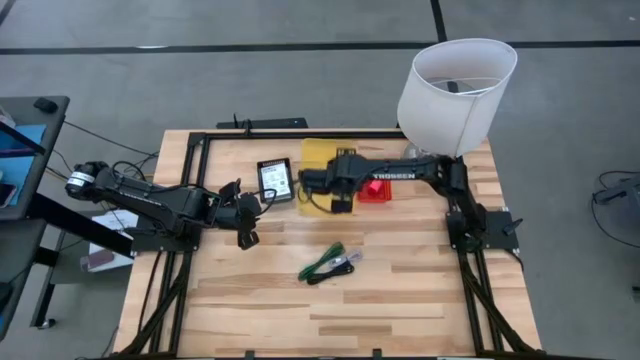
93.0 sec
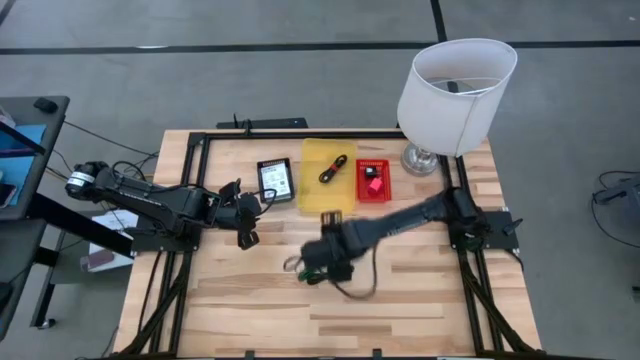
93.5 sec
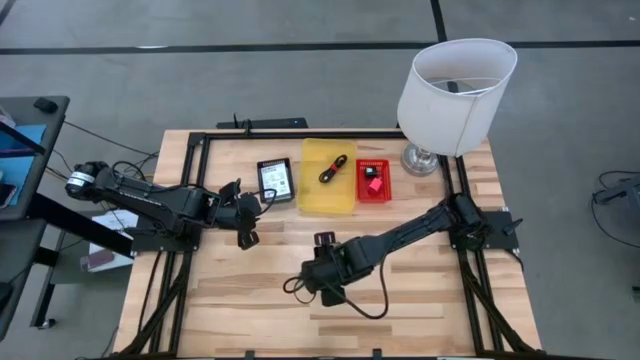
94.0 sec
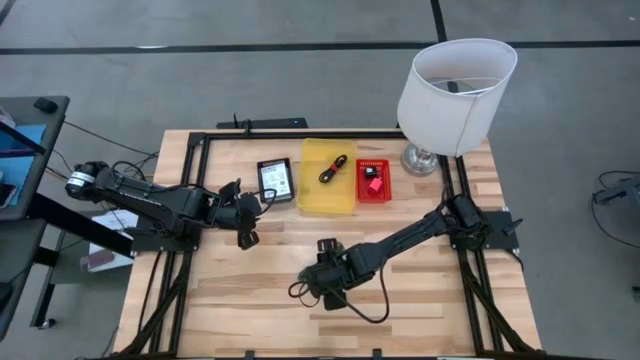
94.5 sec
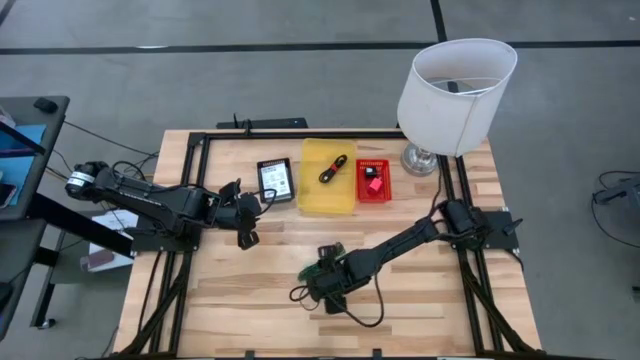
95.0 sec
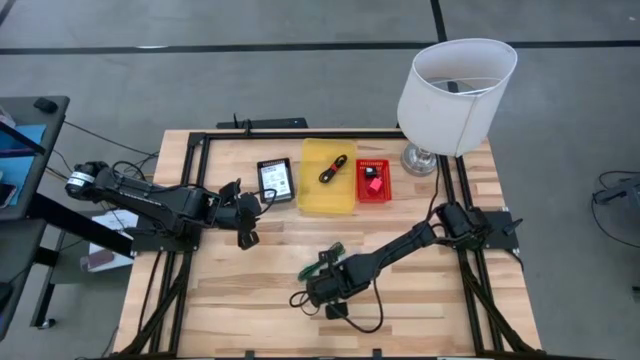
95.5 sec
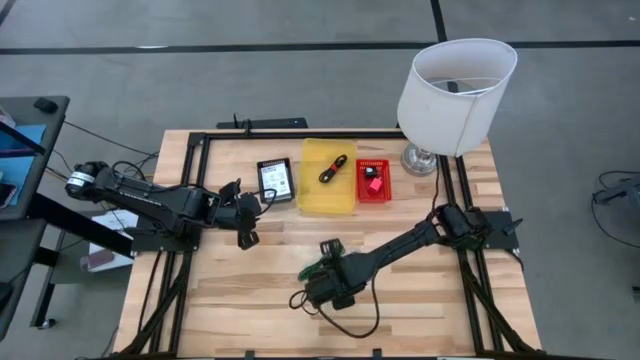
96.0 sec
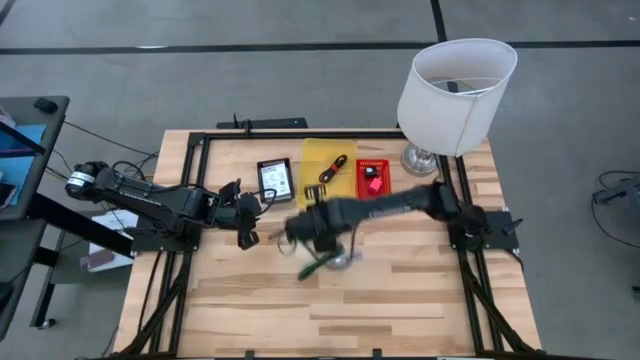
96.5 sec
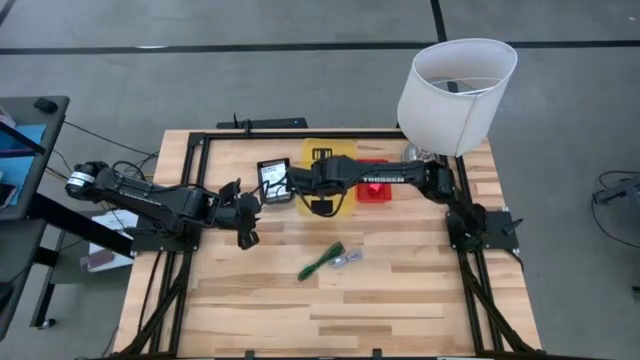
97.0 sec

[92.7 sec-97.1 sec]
Task: Pick and place items into bin
Put the black charger cable into the yellow bin

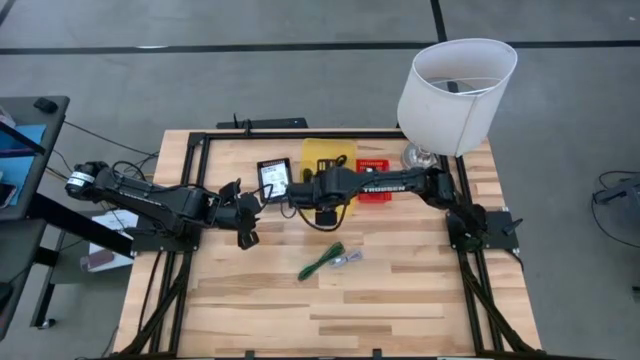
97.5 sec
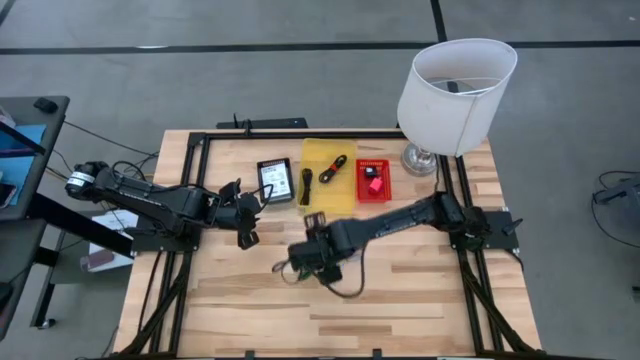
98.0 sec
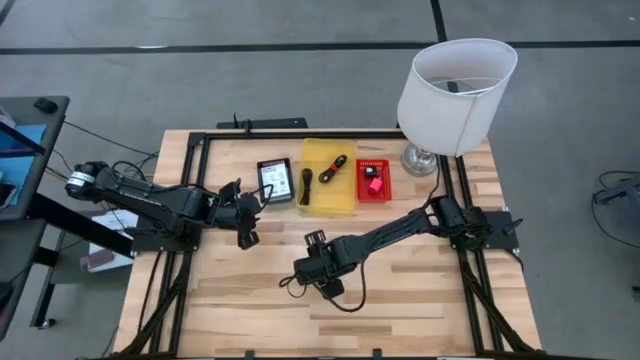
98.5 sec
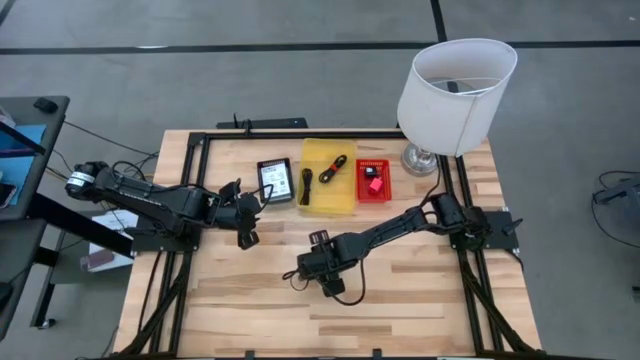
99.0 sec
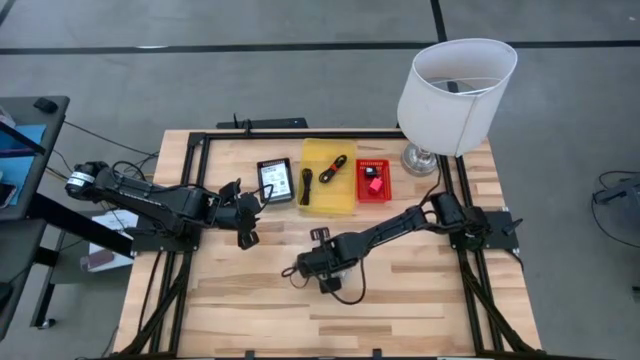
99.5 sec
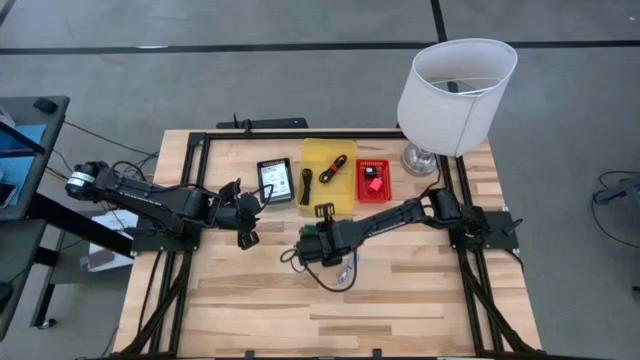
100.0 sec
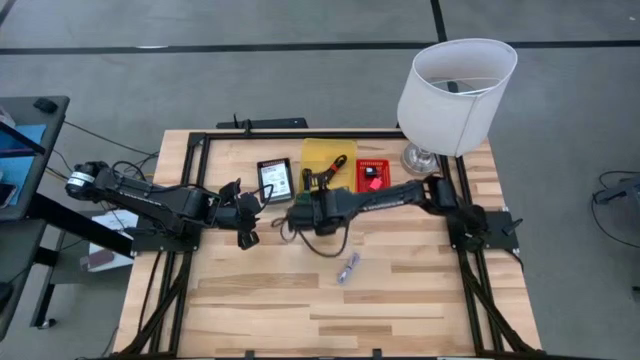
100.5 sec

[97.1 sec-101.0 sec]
Put the green charger cable into the yellow bin

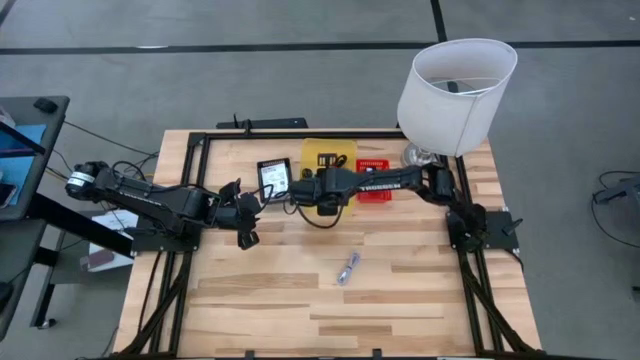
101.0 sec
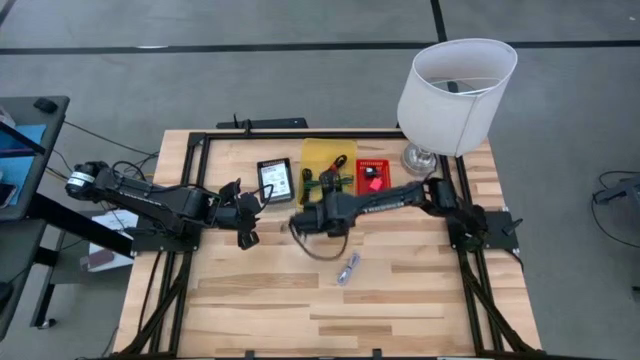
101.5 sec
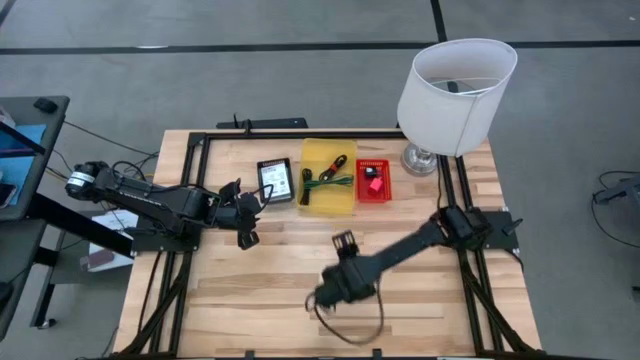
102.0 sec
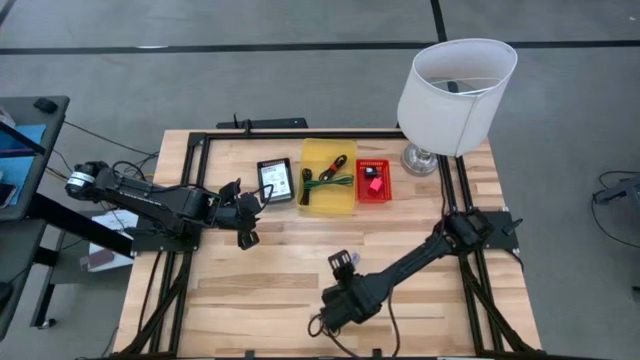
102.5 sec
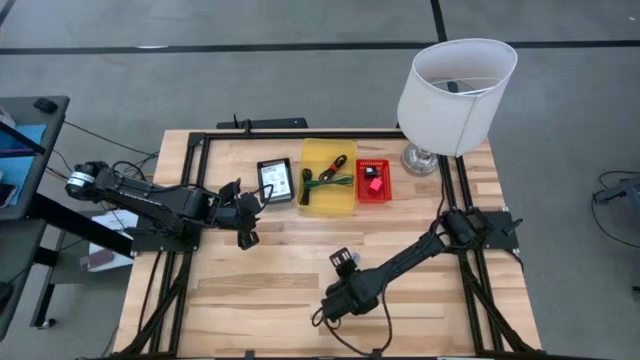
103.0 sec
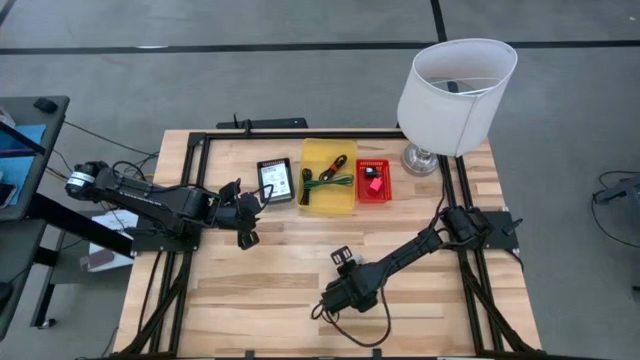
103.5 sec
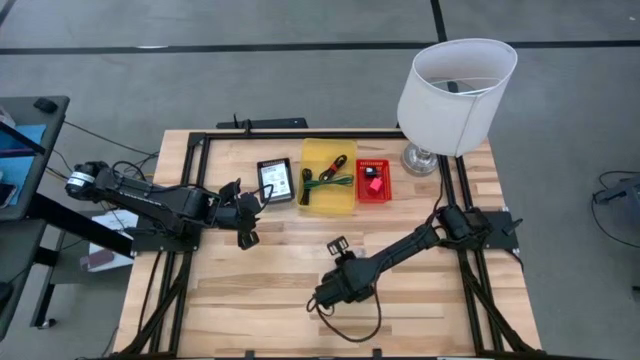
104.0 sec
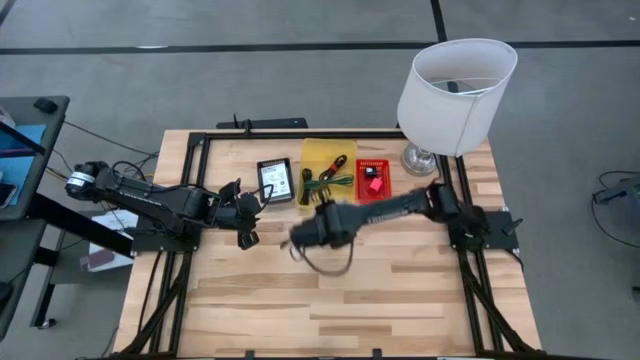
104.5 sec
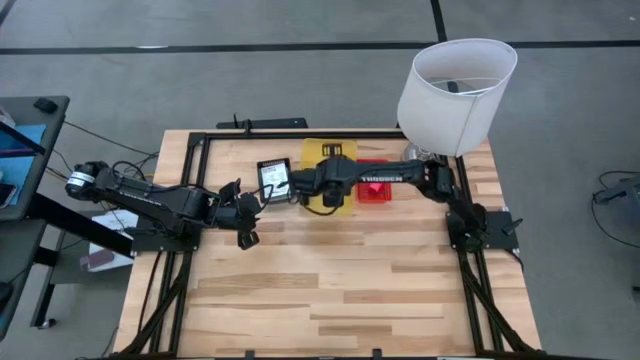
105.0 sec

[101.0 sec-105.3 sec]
Put the white charger cable into the yellow bin

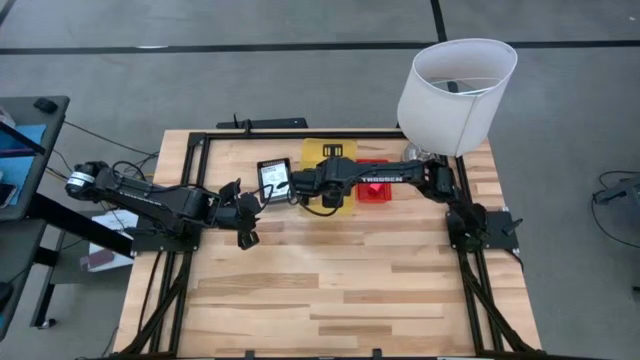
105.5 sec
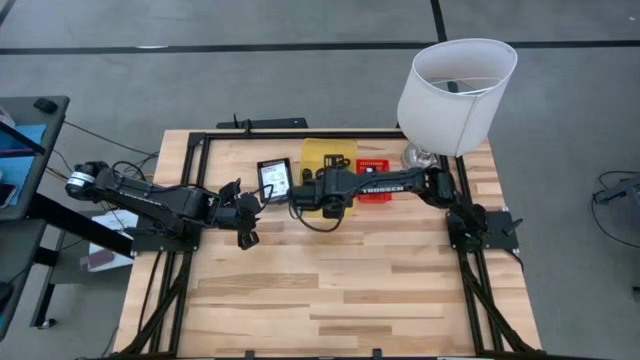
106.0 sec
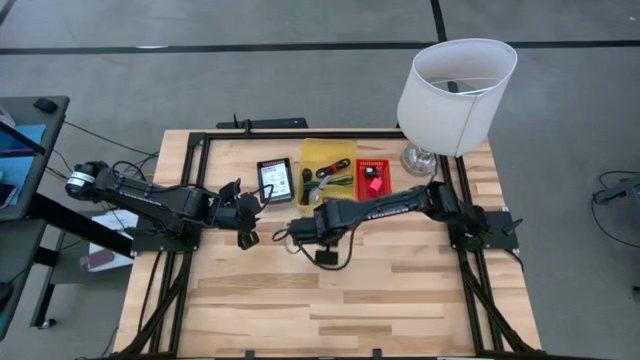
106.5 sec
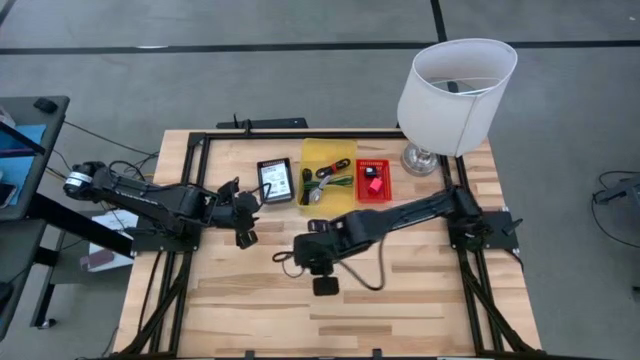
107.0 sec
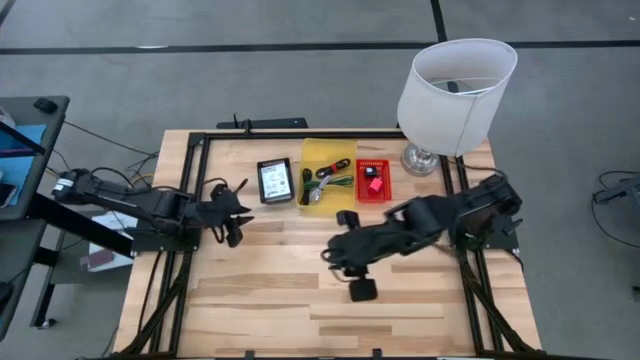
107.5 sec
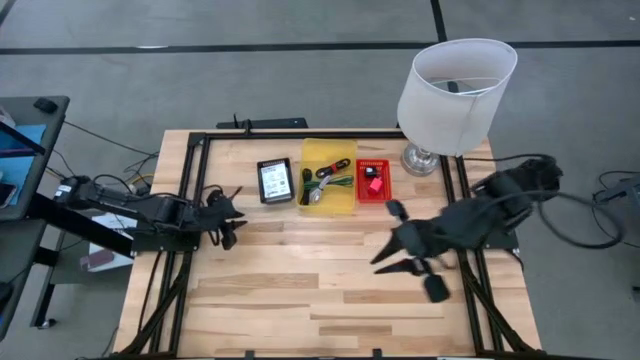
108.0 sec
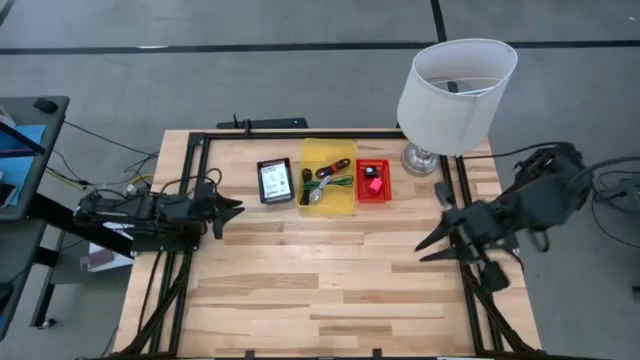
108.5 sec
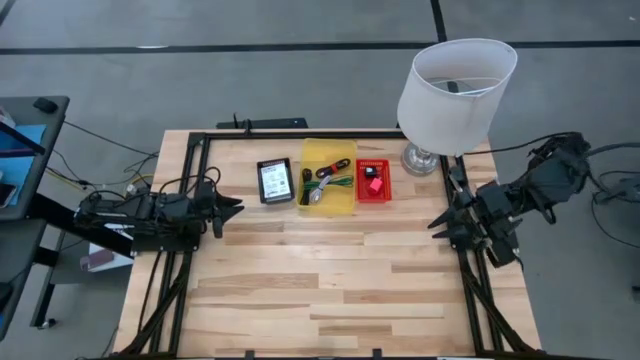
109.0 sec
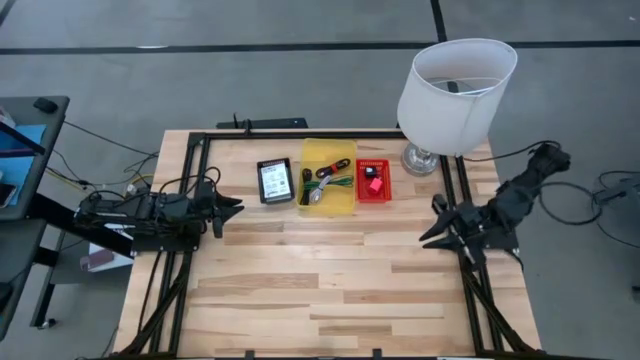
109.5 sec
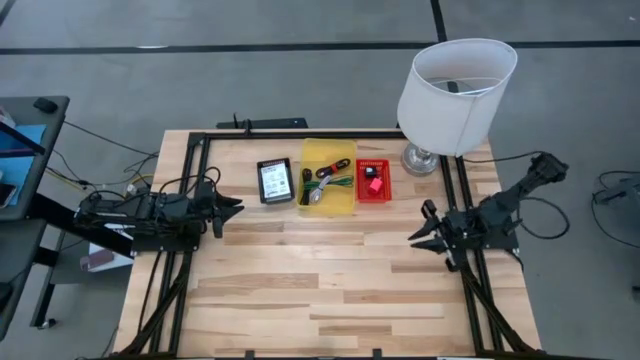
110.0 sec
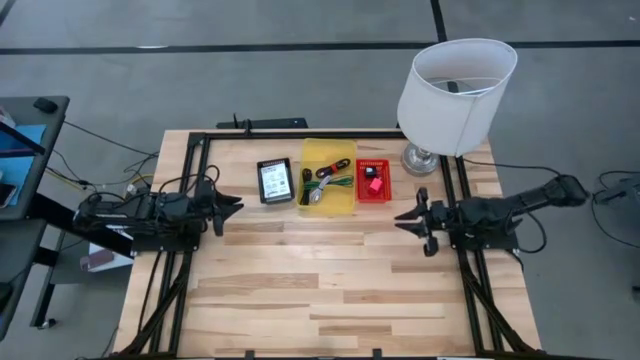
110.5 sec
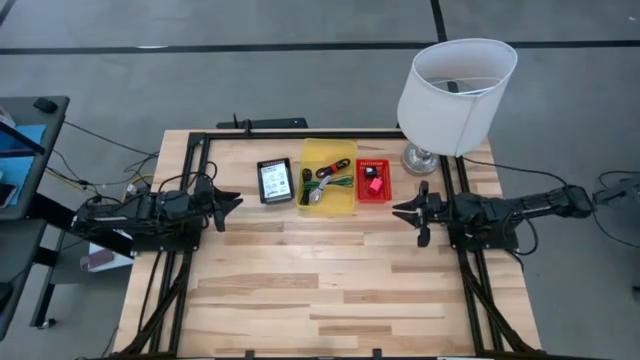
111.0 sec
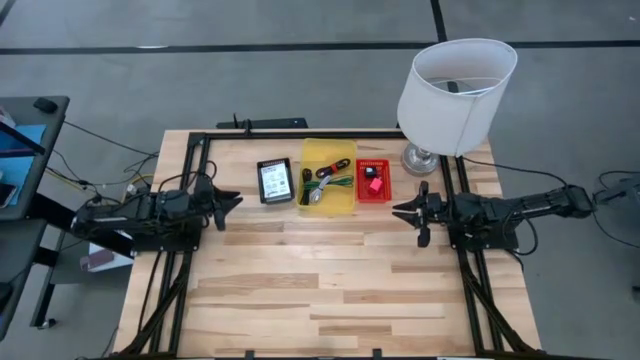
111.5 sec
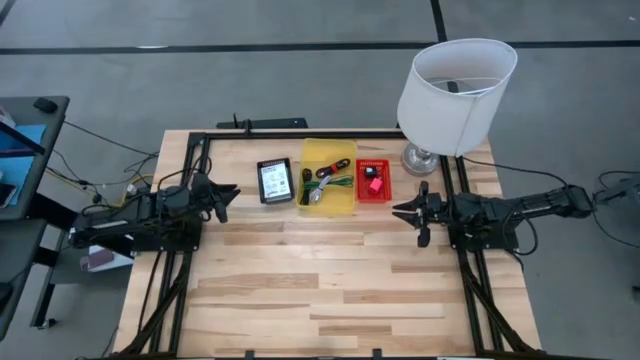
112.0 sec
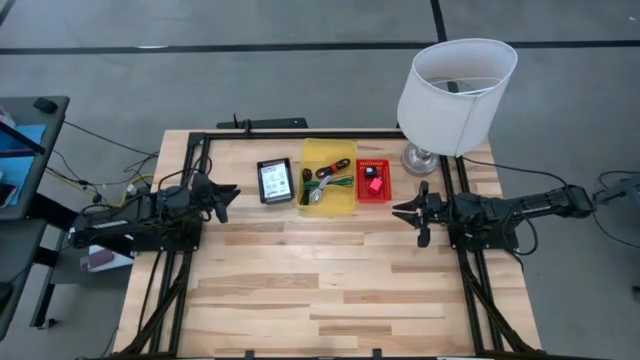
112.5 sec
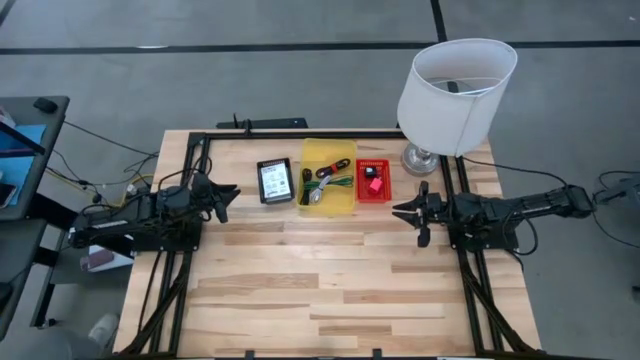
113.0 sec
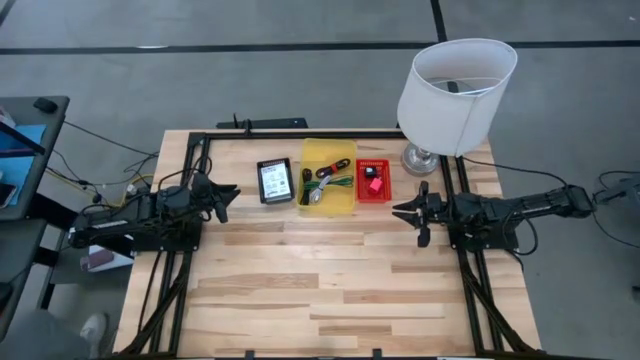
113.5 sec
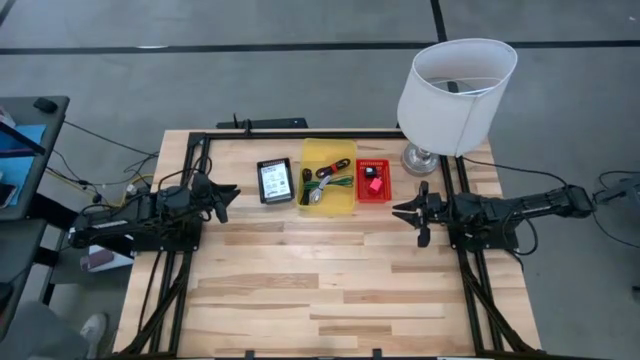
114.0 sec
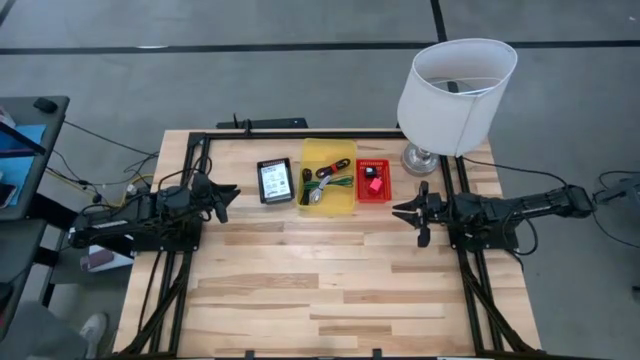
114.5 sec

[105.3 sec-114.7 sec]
Return to Home Position
